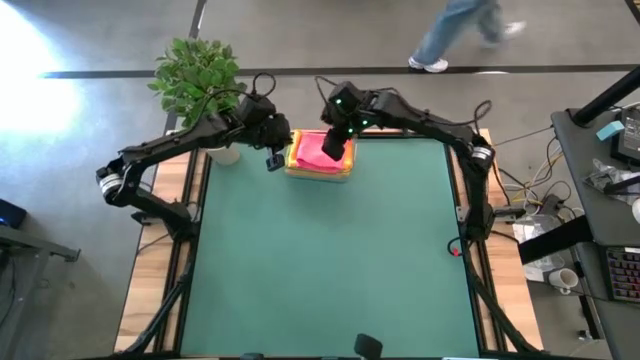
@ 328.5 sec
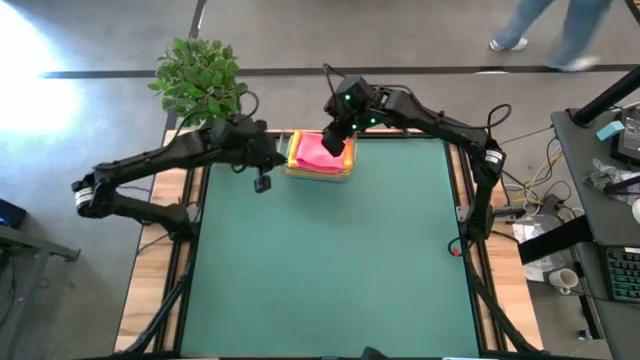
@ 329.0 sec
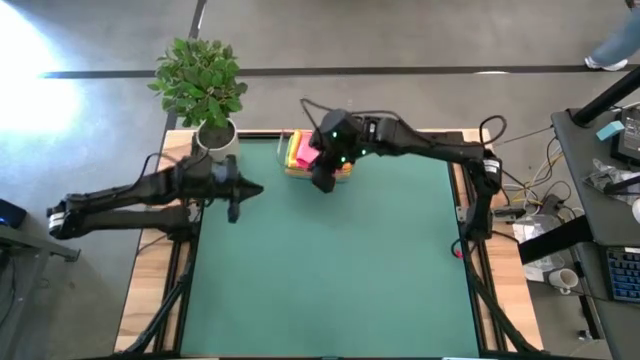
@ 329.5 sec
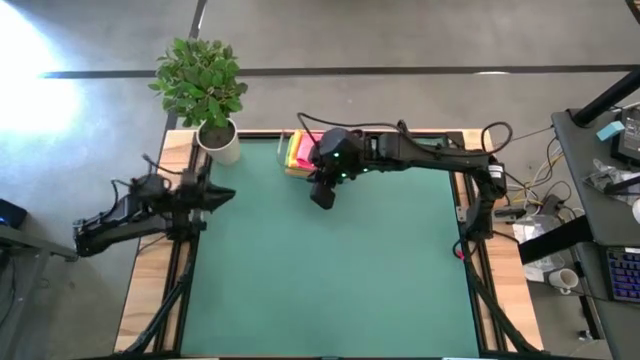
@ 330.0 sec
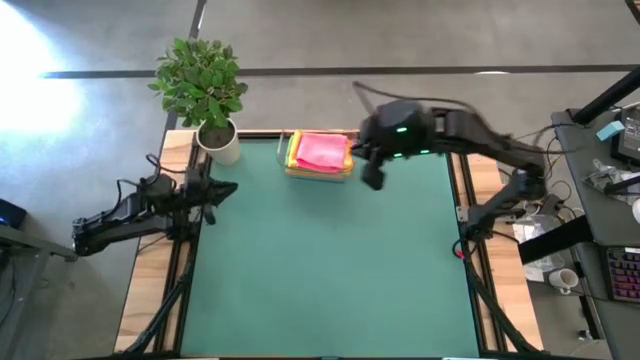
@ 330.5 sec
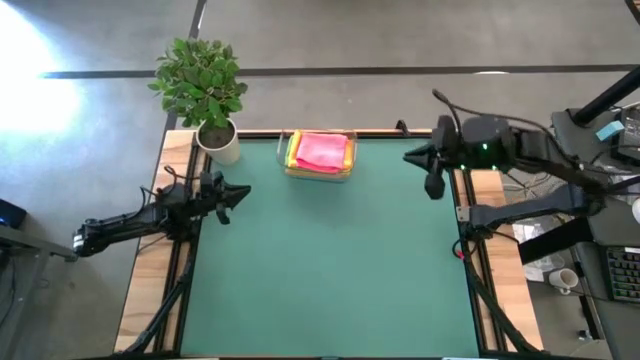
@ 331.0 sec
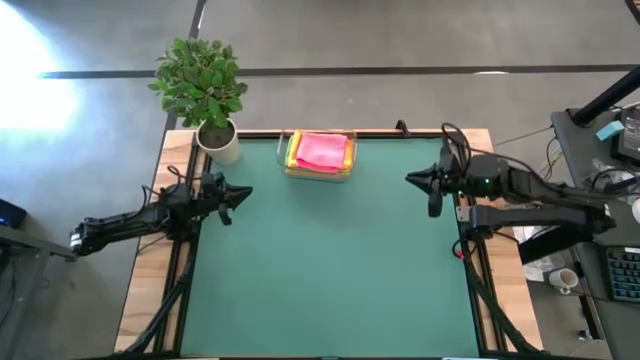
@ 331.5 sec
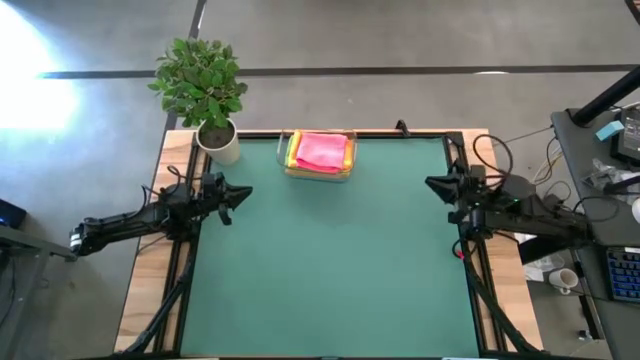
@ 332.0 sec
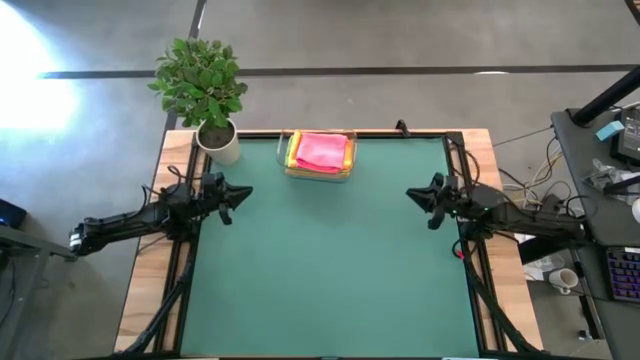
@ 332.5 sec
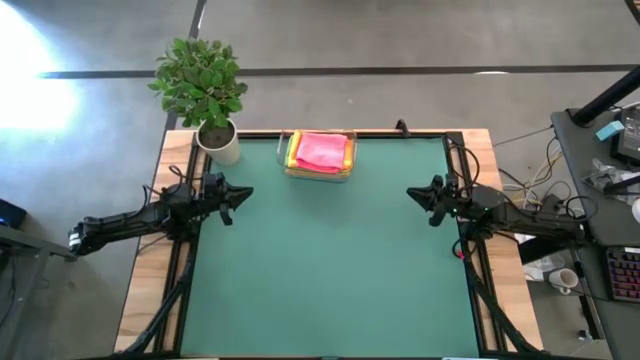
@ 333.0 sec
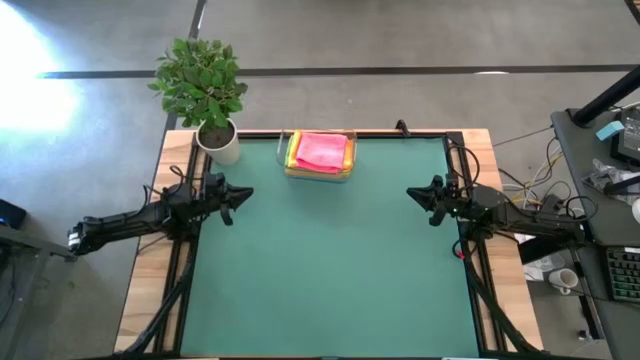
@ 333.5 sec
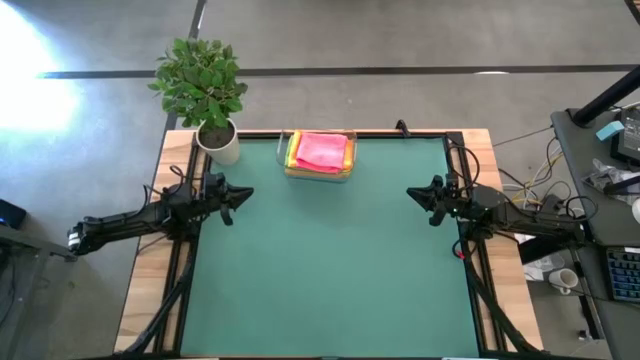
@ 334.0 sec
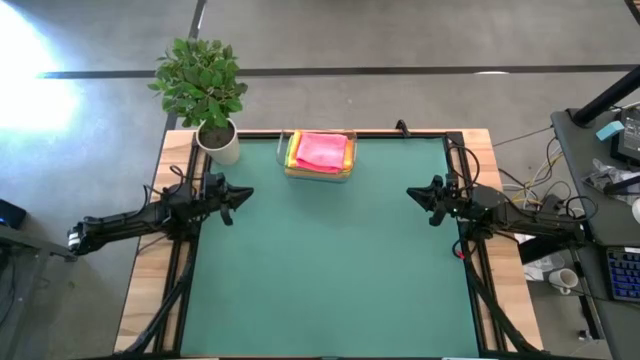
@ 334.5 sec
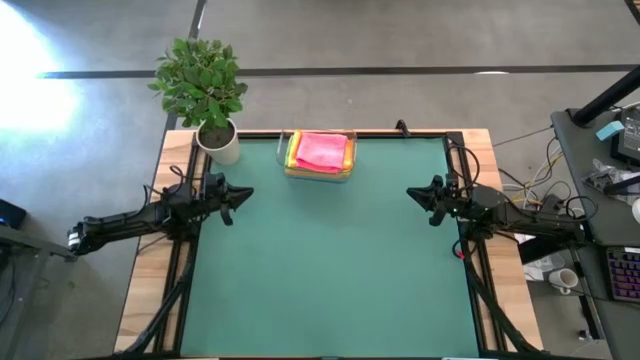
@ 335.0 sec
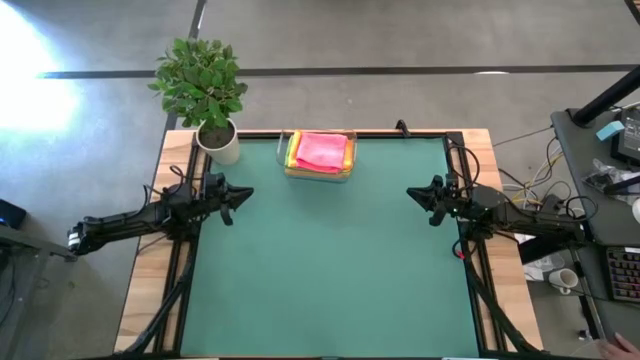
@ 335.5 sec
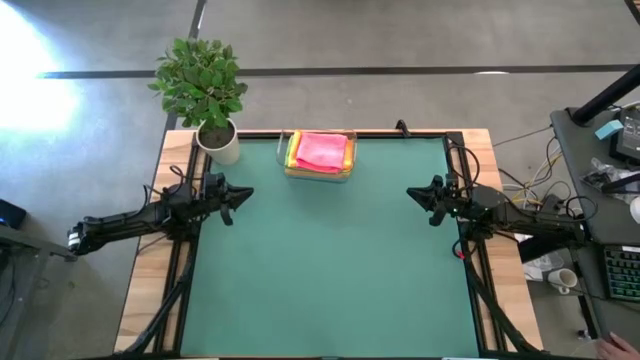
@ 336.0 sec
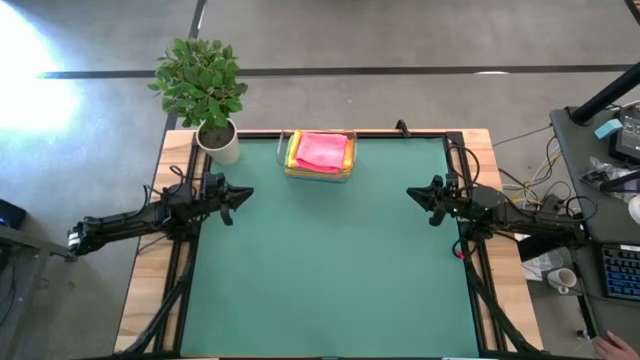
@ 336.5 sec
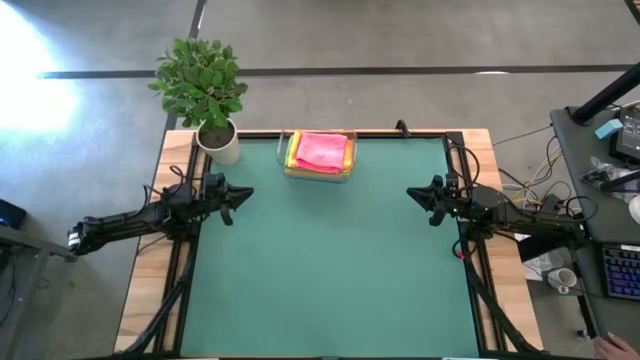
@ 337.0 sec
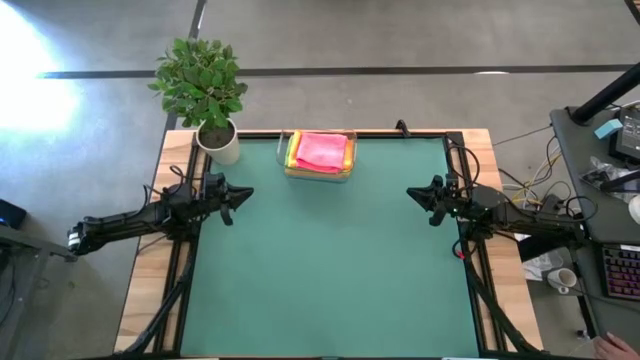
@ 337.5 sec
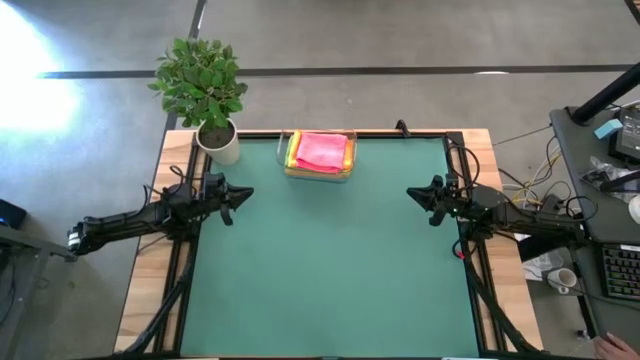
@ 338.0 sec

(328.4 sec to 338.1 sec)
Task: Fold microfiber towels
Return to Home Position
